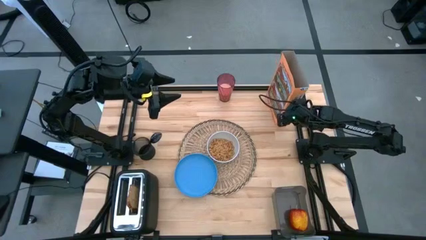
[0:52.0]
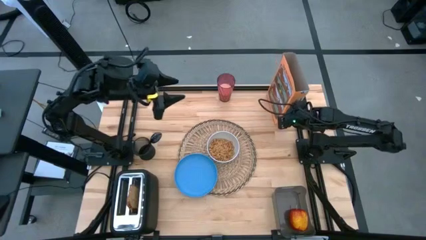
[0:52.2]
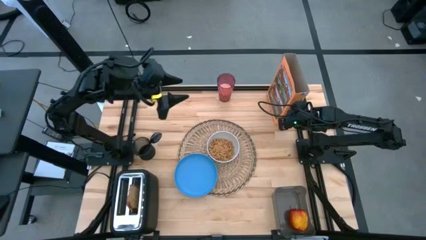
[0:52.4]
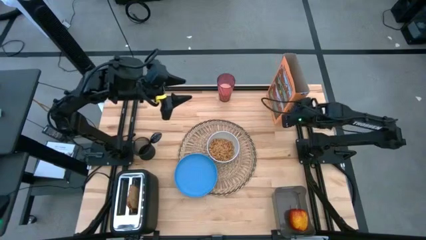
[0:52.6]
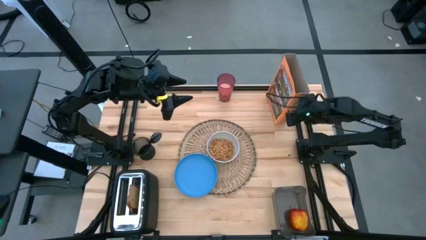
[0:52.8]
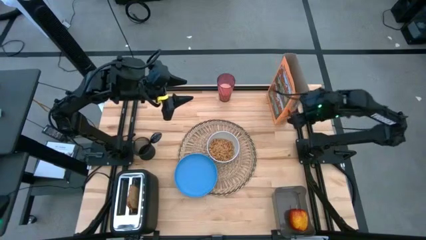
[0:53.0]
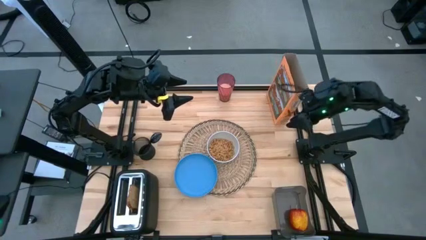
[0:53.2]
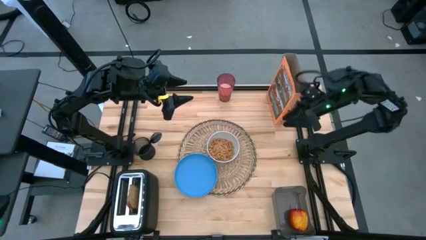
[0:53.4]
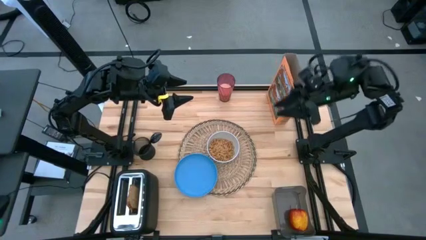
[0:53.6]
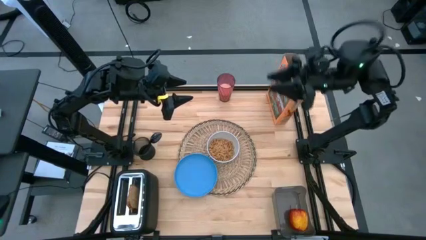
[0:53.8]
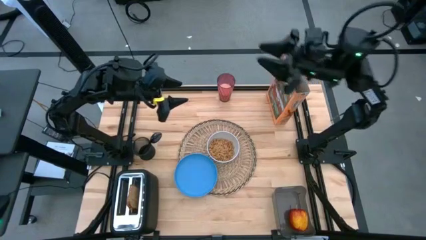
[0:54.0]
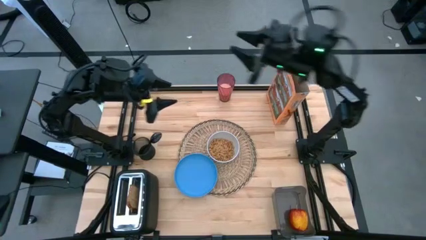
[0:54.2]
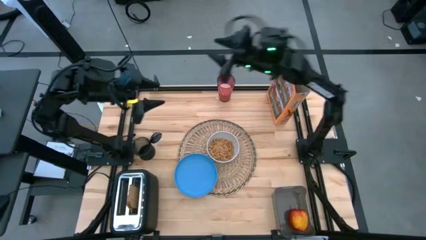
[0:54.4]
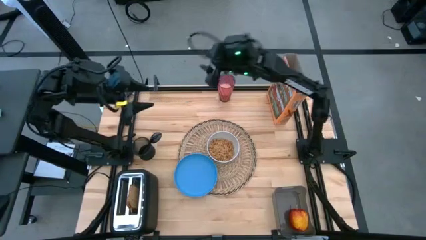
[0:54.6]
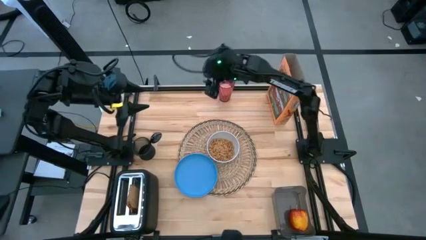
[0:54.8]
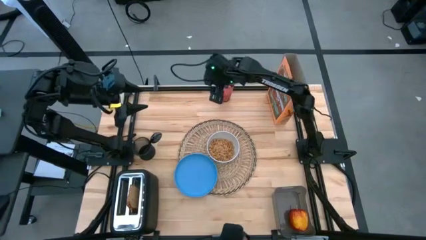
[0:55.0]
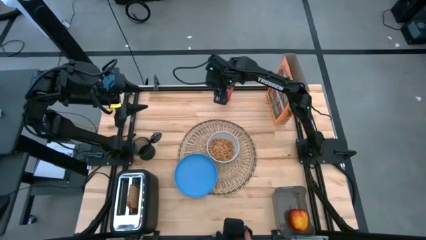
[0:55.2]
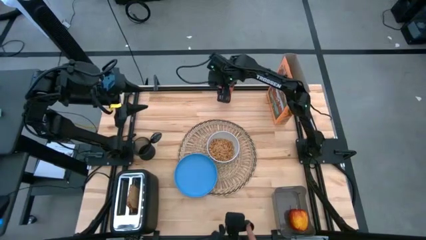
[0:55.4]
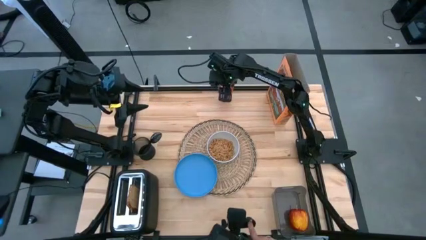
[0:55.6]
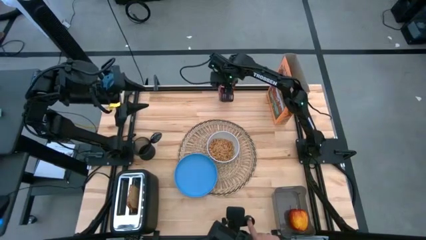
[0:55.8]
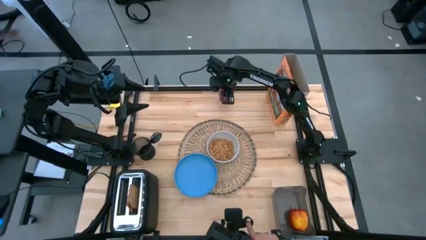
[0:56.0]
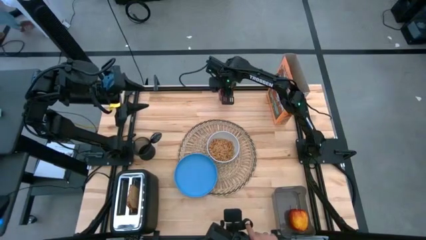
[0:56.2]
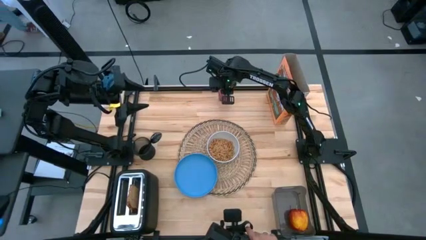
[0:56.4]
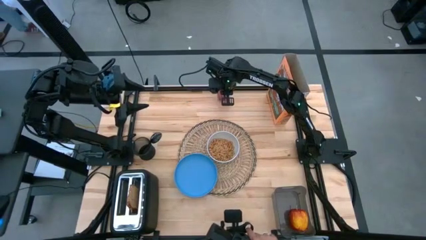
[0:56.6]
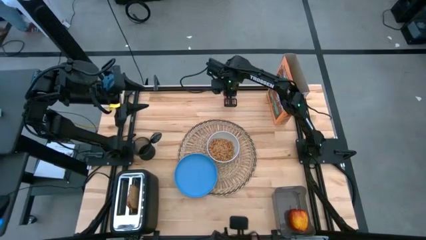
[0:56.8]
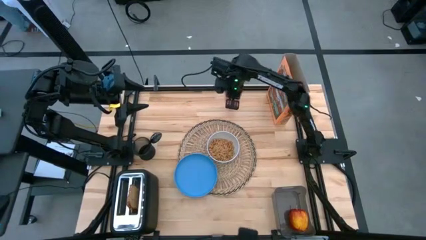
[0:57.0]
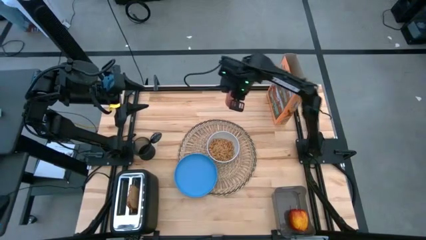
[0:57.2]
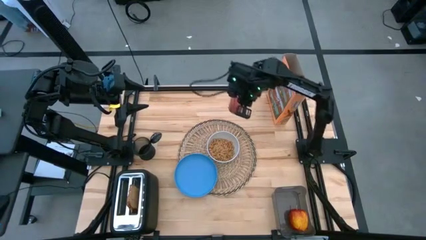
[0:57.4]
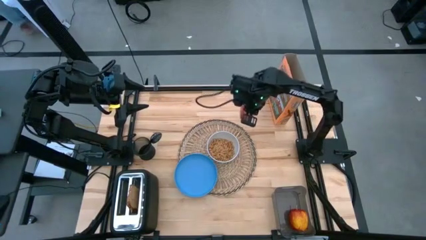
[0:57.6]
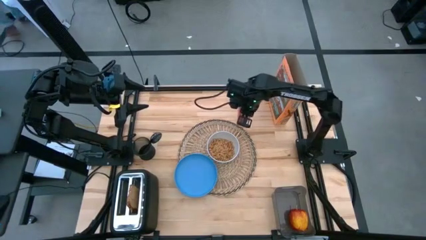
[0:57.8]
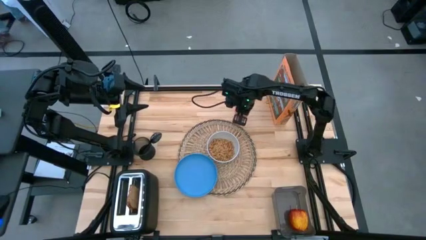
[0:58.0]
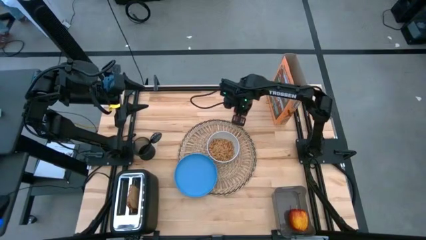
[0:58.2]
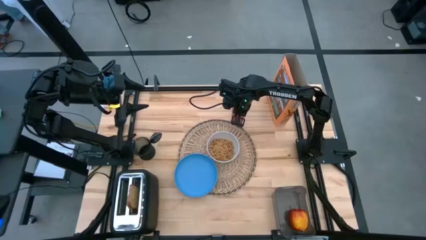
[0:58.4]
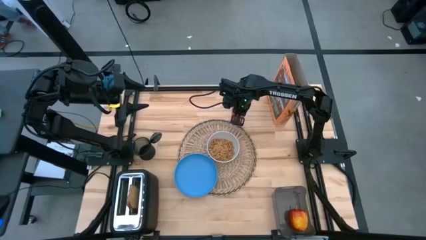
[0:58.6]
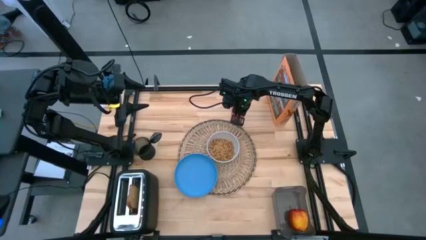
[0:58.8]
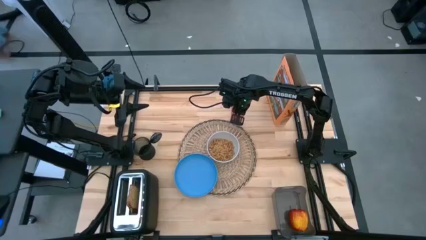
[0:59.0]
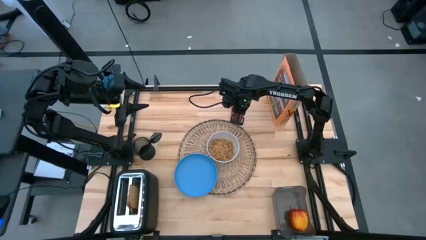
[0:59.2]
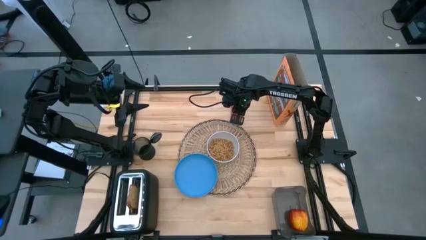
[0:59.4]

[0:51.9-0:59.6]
Task: Arrange a breakfast setting
Move the red glass to the top right of the table mat

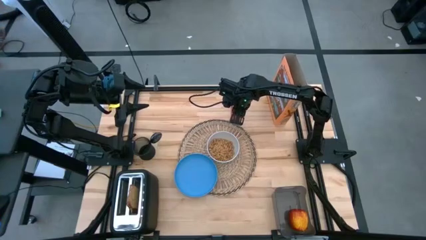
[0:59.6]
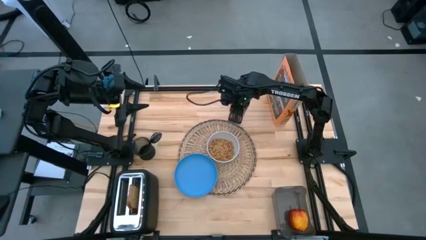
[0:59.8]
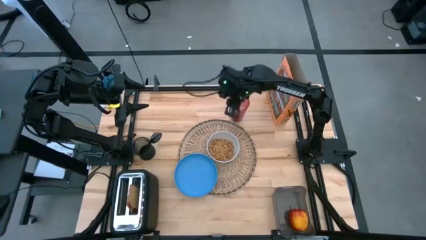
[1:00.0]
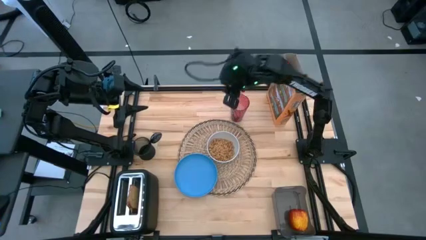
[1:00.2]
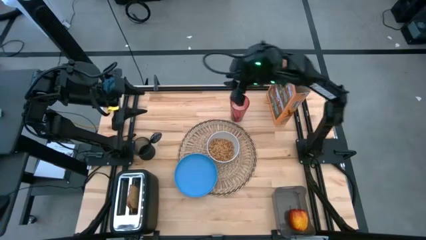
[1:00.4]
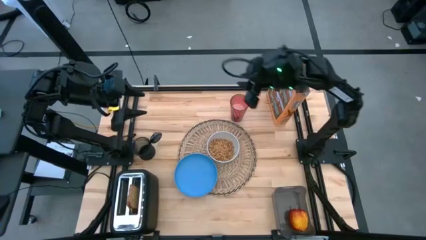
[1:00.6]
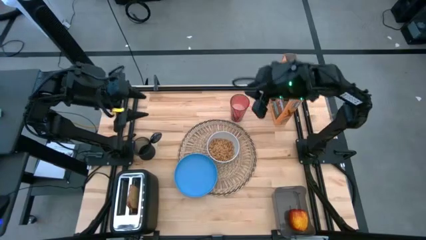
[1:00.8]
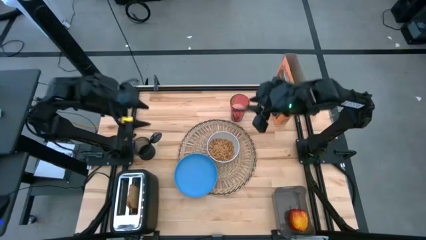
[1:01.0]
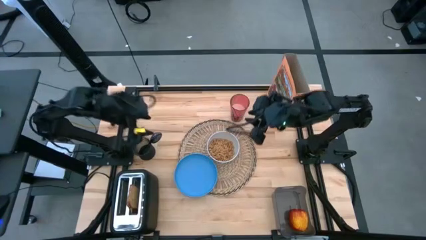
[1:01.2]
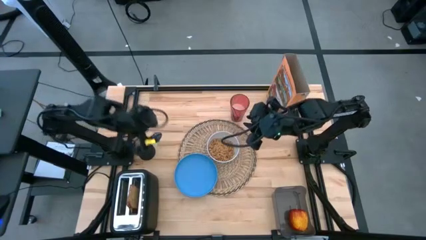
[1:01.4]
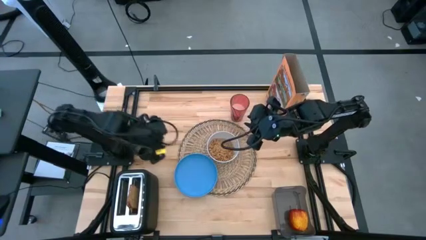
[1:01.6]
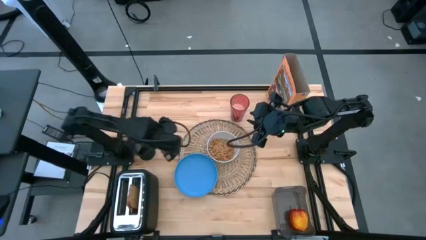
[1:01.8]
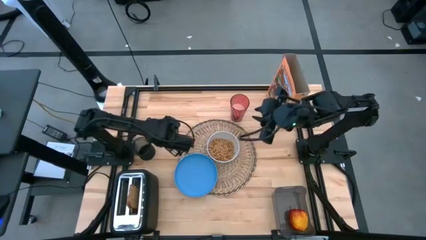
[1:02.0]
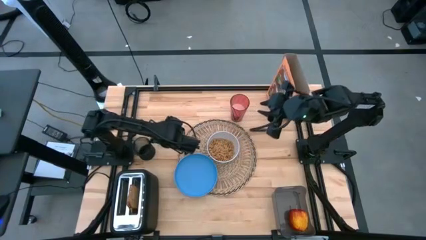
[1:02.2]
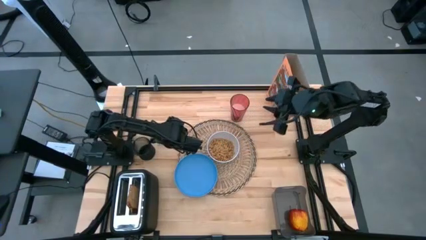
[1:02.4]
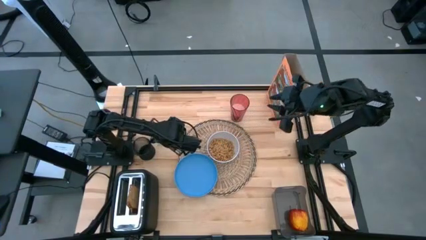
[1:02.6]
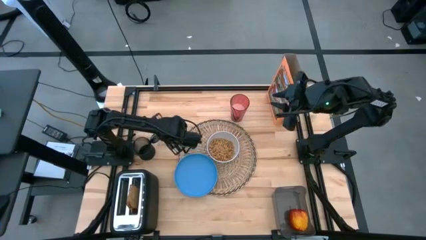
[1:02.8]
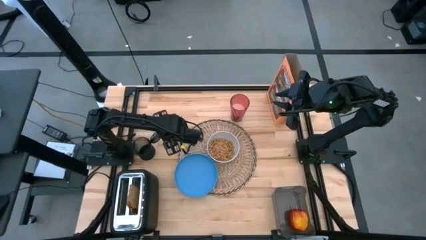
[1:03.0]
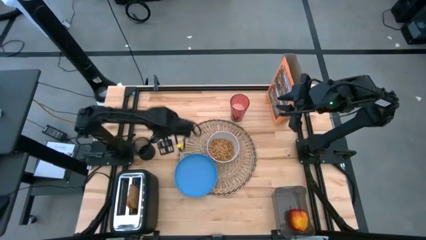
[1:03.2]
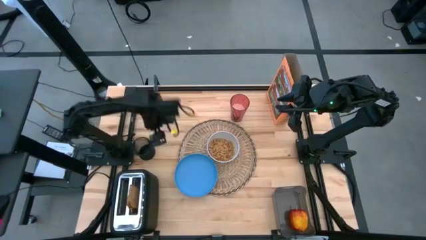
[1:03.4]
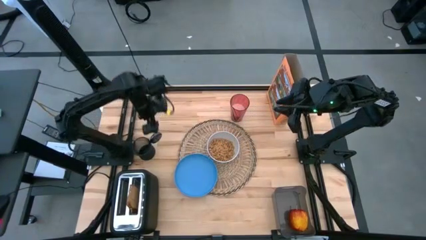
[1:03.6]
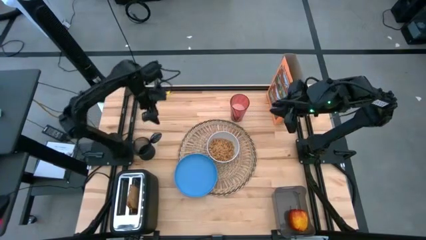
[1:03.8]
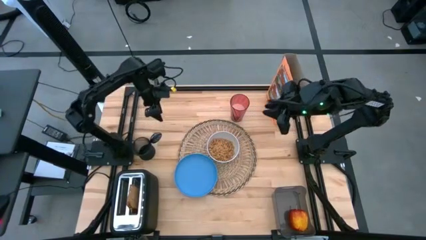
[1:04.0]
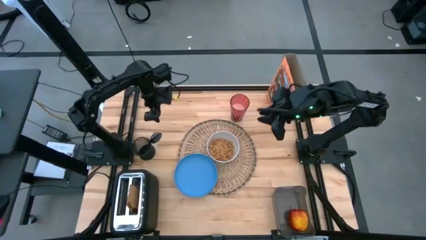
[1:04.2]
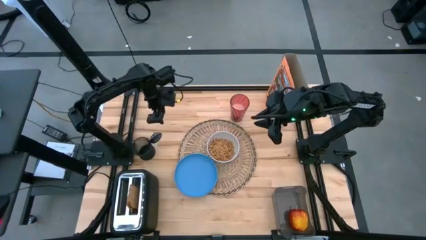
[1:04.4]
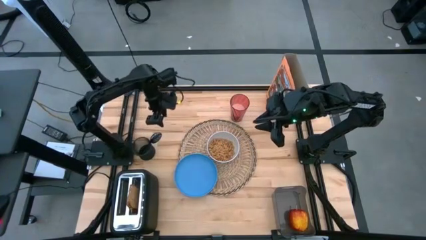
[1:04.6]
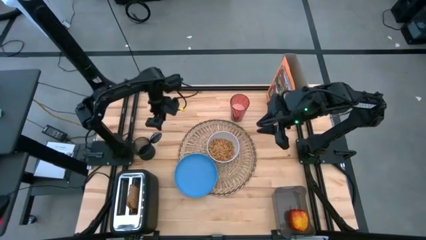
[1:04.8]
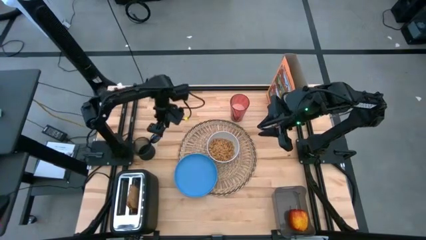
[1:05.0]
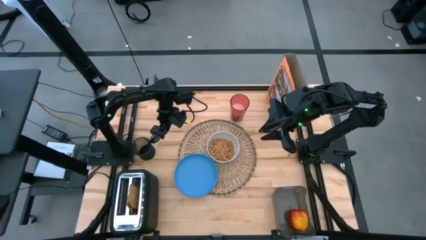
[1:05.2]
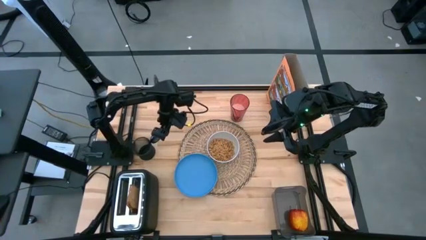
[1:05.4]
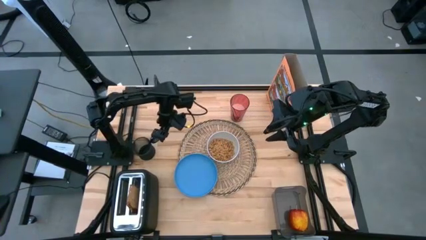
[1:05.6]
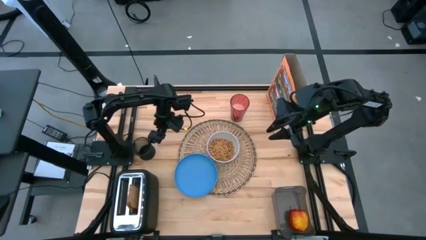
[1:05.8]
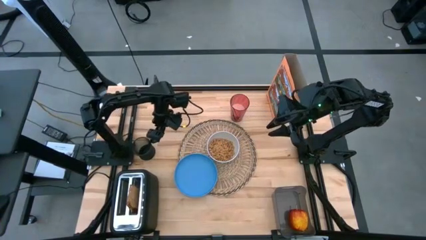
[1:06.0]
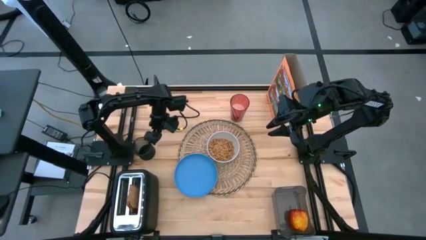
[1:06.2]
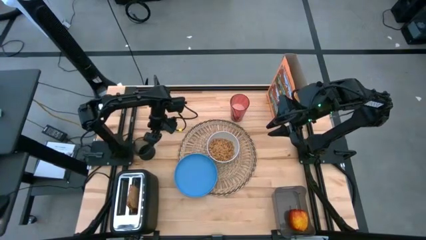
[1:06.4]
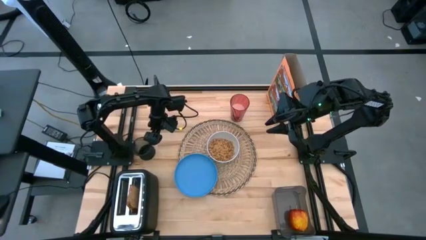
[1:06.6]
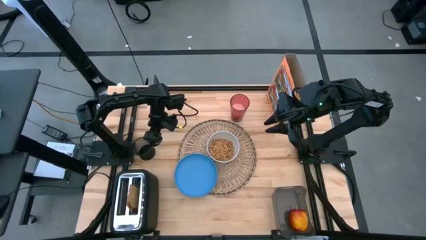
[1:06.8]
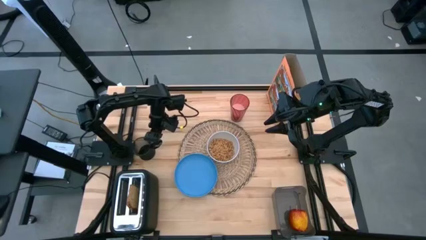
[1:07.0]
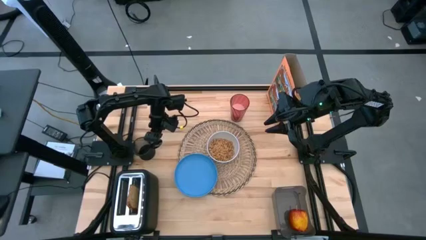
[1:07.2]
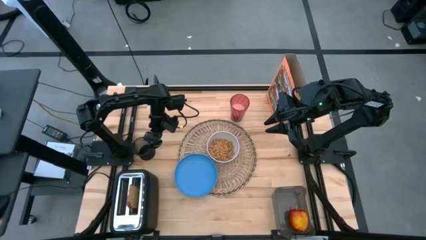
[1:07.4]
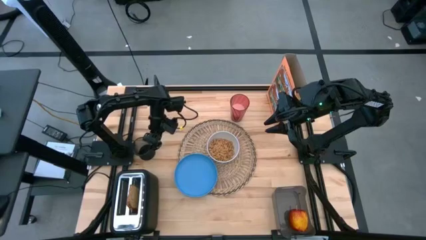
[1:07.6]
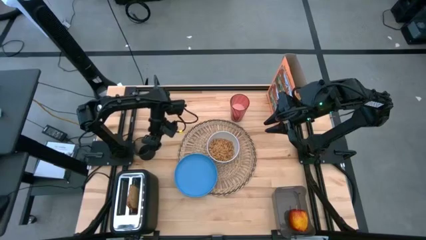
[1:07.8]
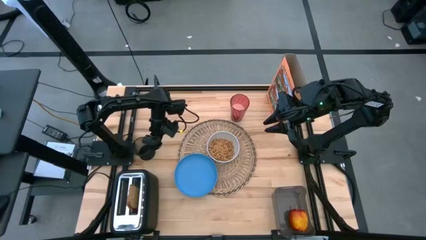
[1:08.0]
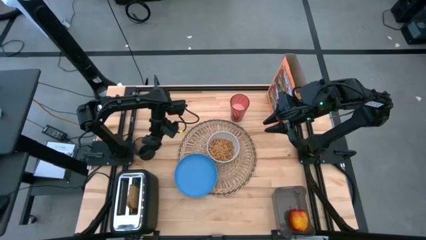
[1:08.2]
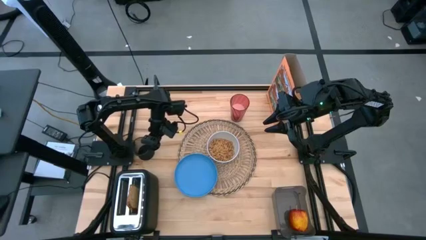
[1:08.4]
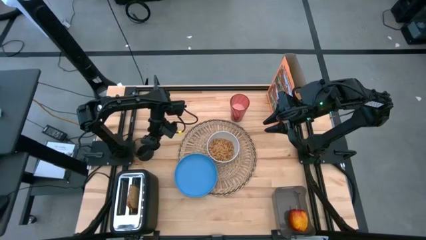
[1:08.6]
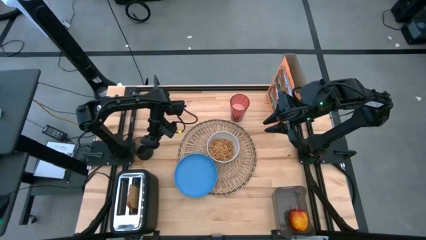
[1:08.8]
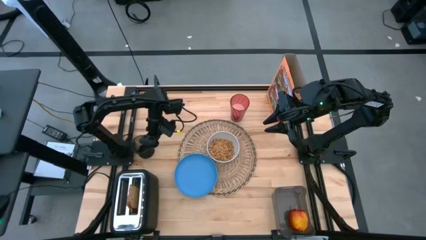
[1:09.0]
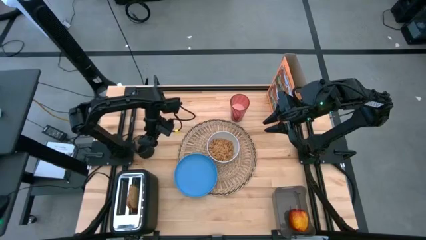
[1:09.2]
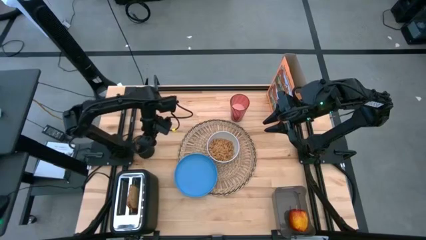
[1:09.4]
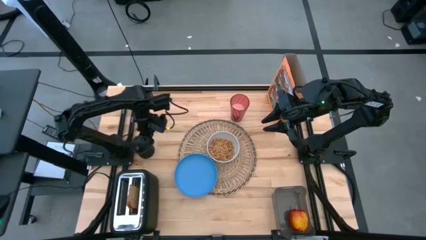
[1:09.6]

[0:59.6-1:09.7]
Put the spoon on the right side of the white bowl
